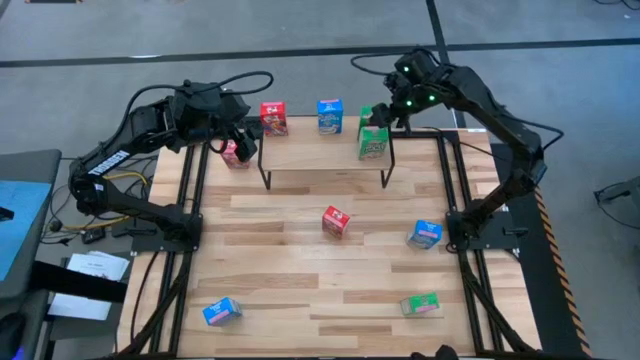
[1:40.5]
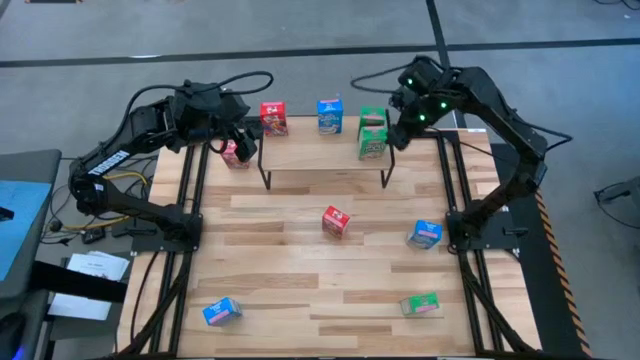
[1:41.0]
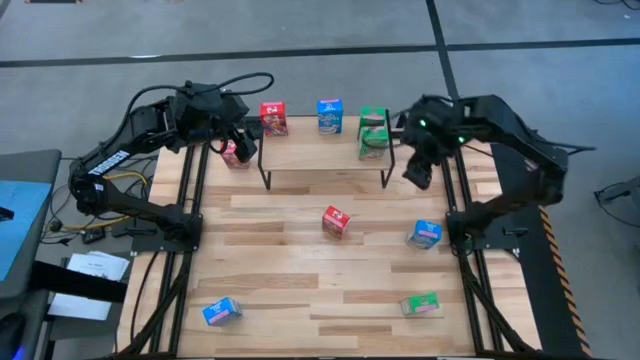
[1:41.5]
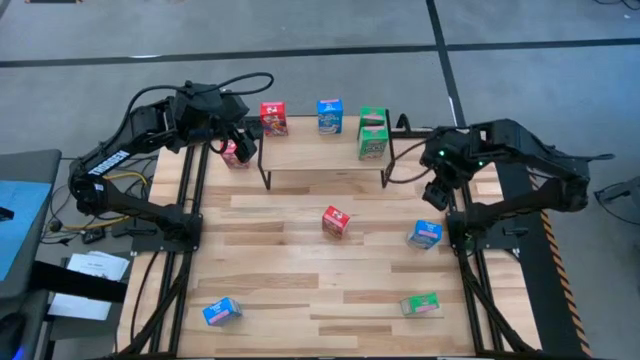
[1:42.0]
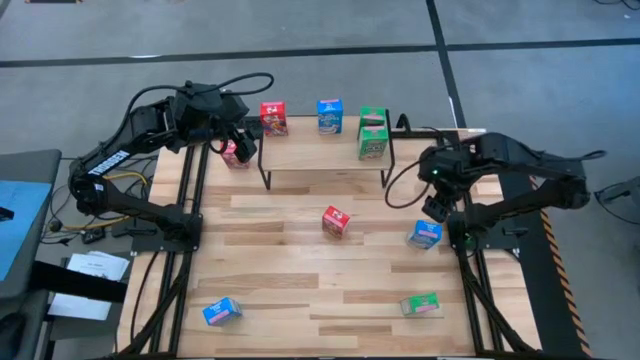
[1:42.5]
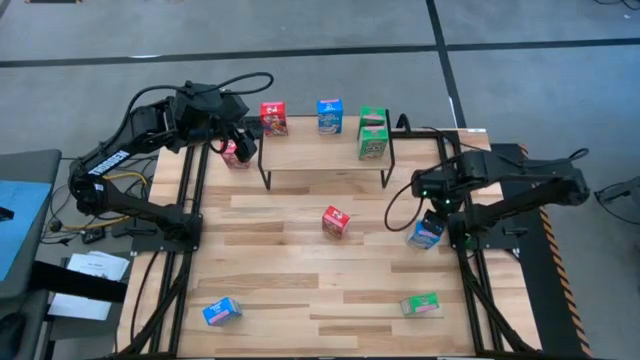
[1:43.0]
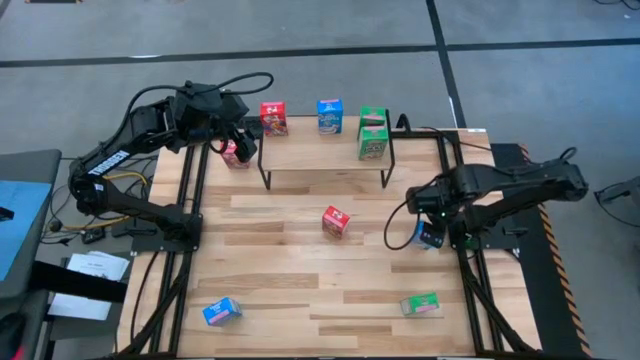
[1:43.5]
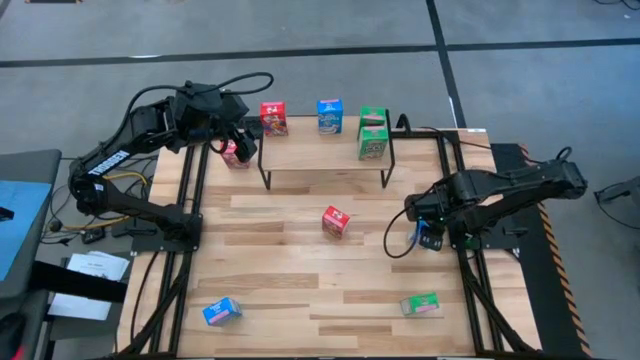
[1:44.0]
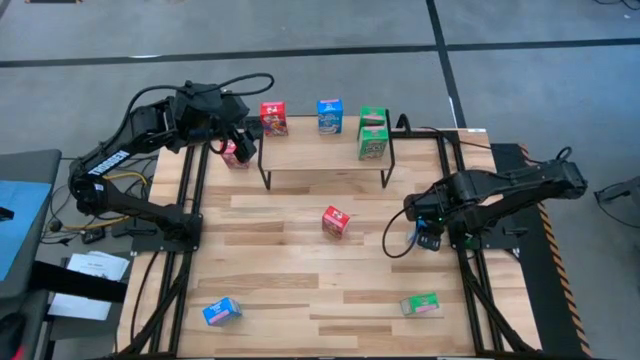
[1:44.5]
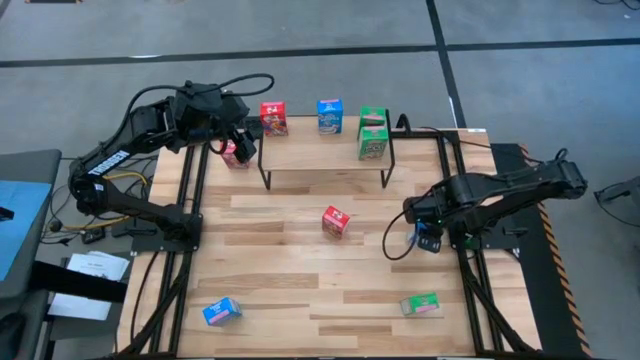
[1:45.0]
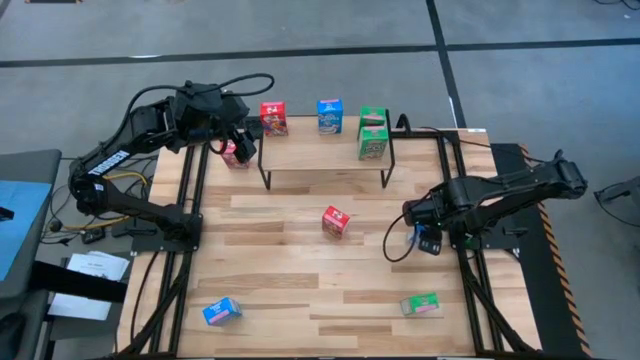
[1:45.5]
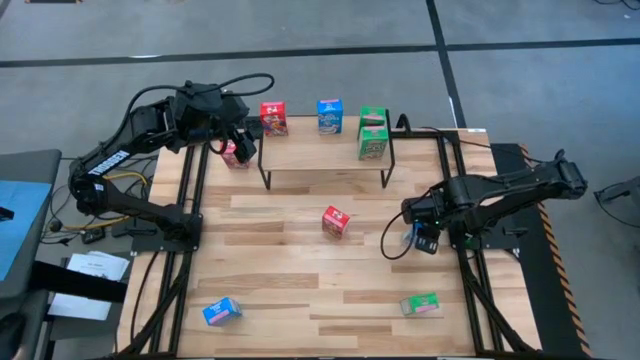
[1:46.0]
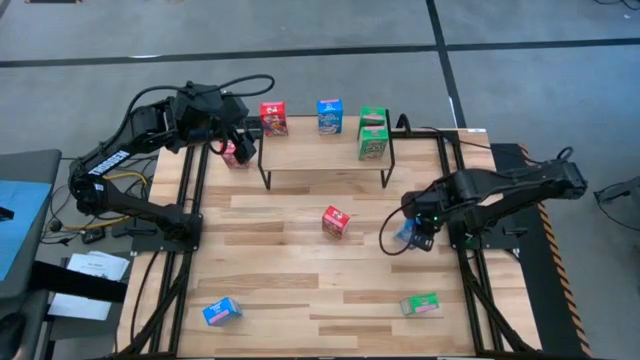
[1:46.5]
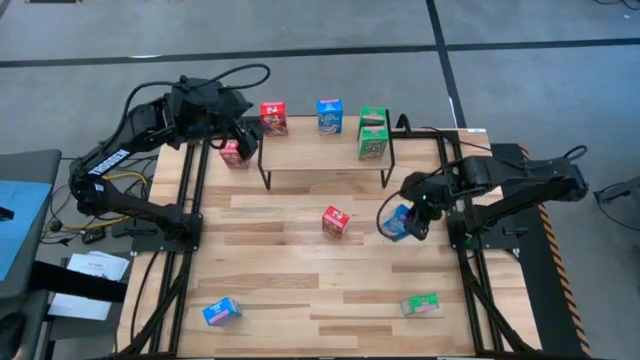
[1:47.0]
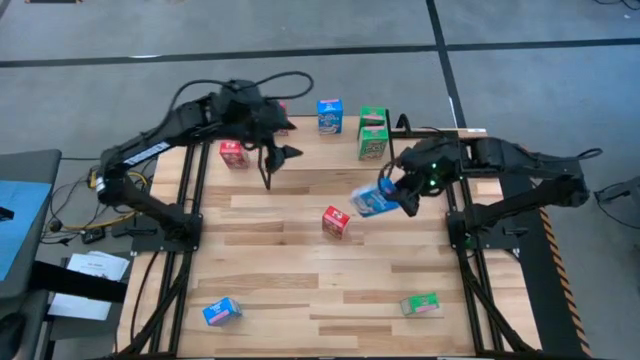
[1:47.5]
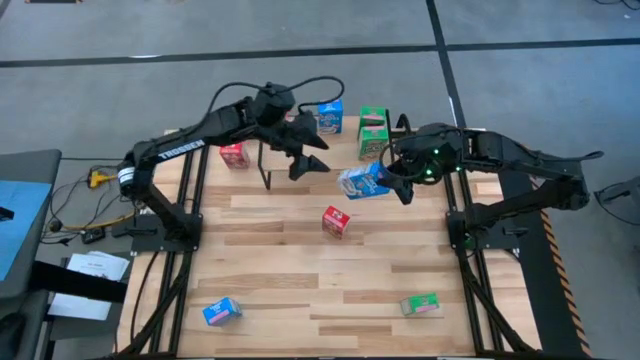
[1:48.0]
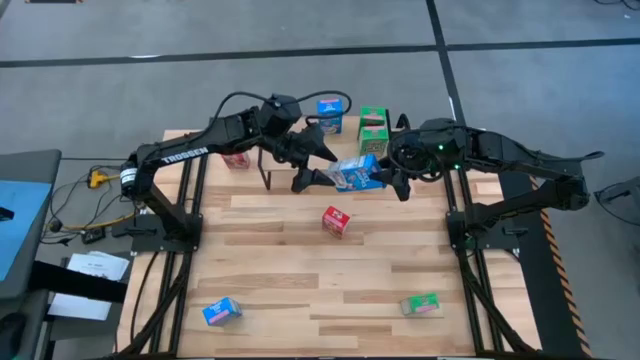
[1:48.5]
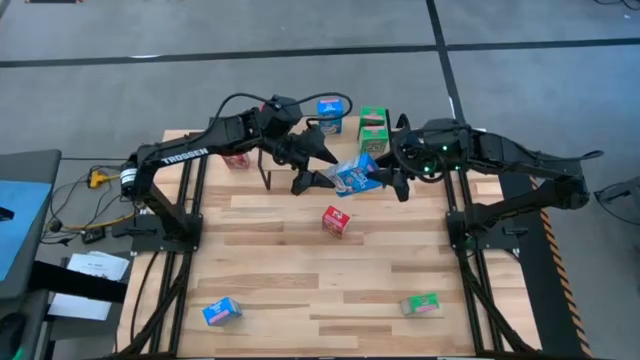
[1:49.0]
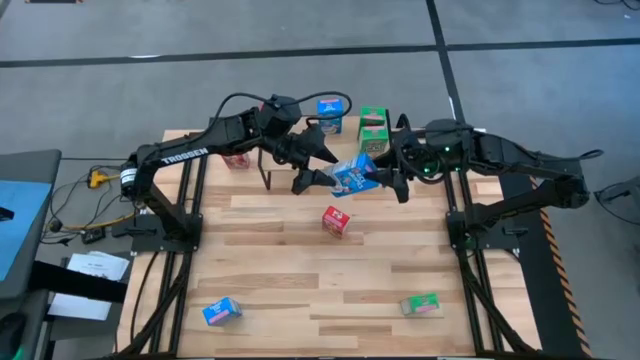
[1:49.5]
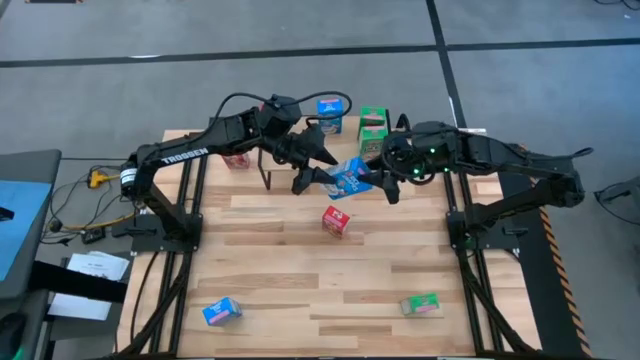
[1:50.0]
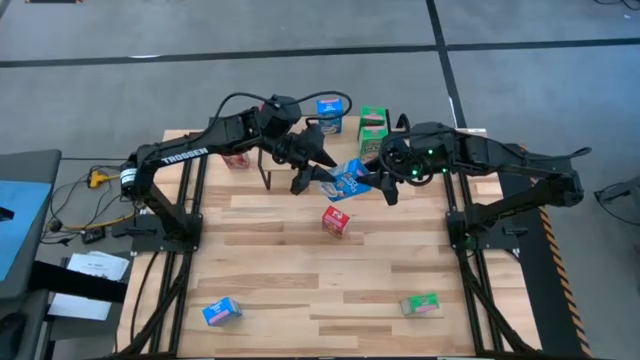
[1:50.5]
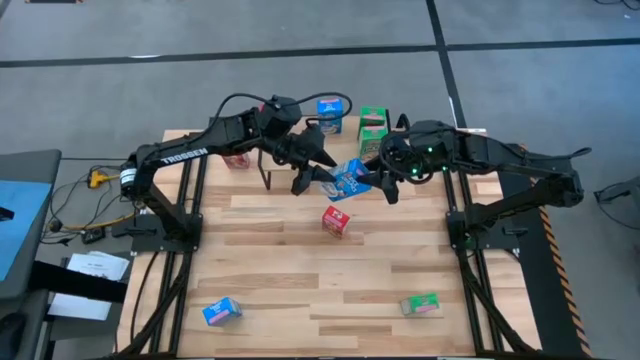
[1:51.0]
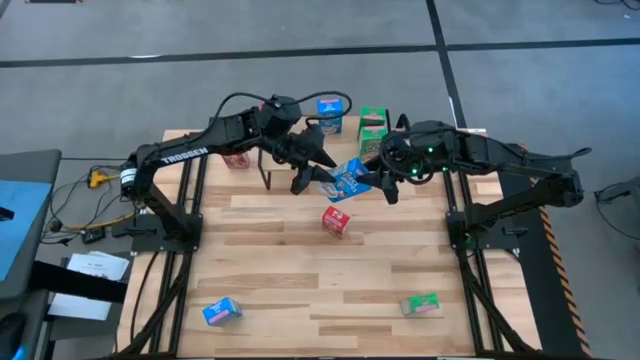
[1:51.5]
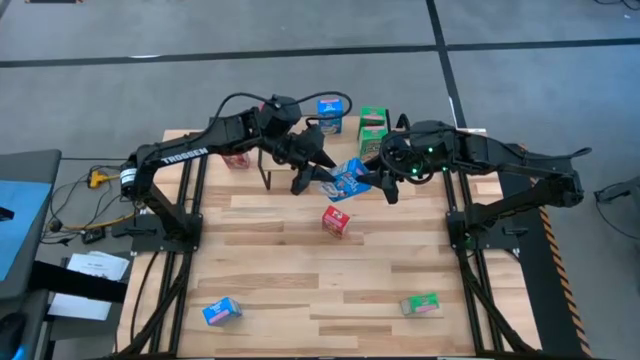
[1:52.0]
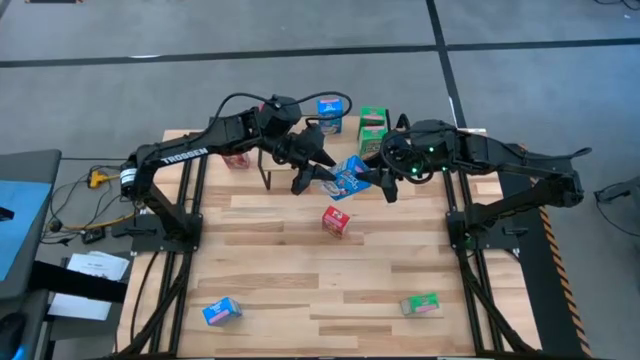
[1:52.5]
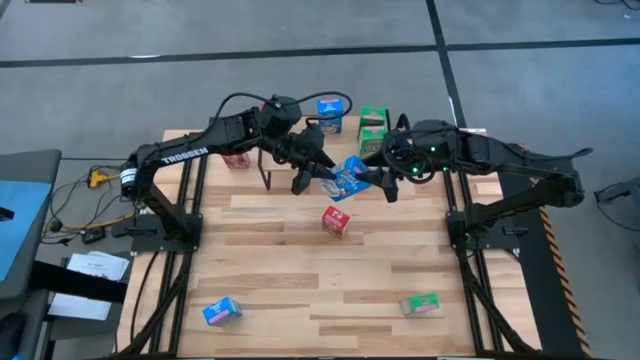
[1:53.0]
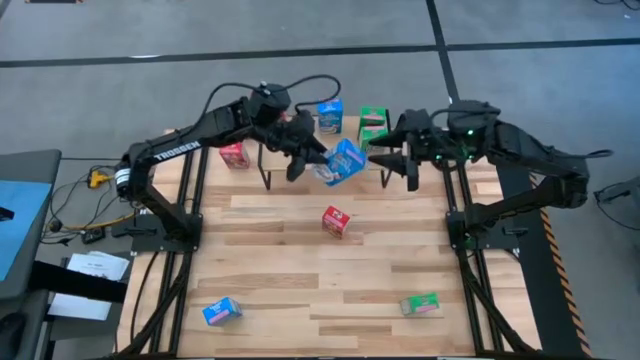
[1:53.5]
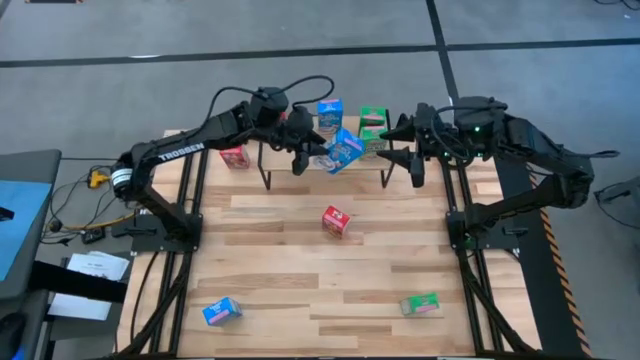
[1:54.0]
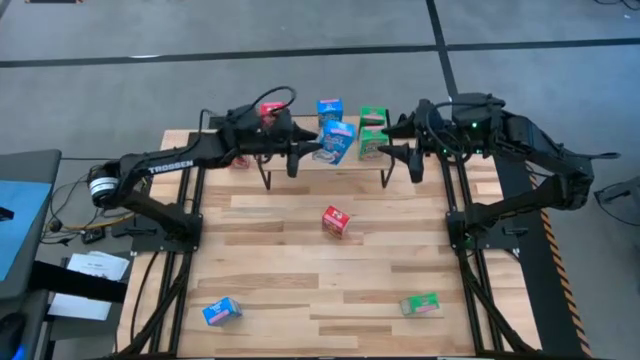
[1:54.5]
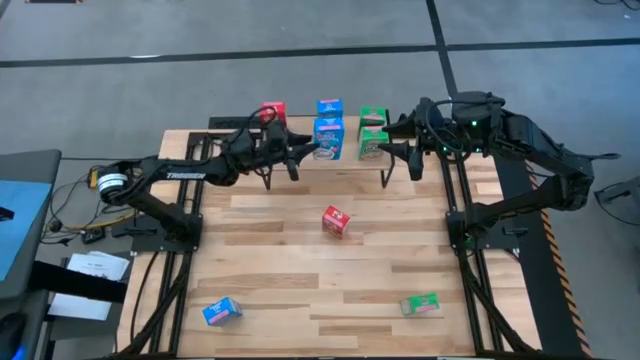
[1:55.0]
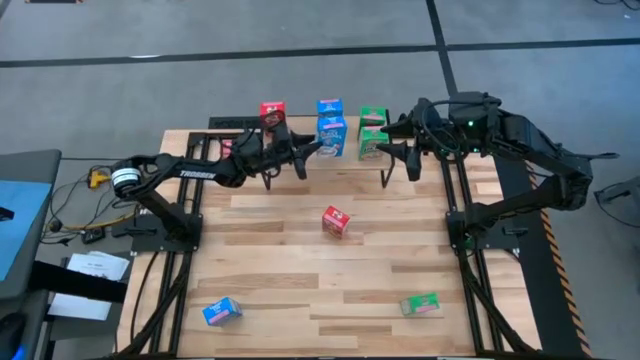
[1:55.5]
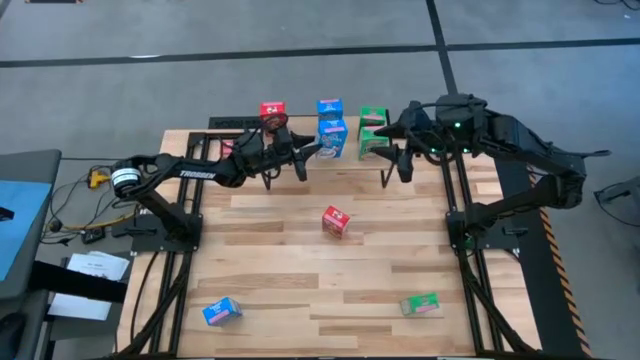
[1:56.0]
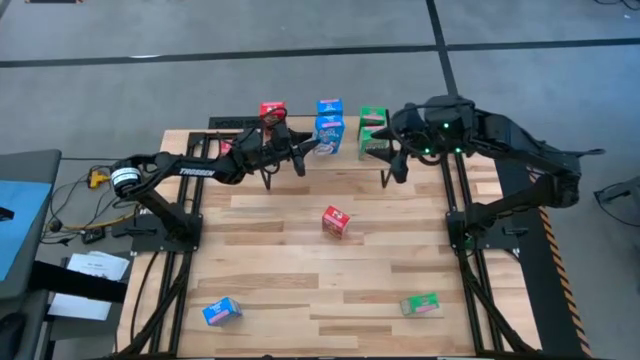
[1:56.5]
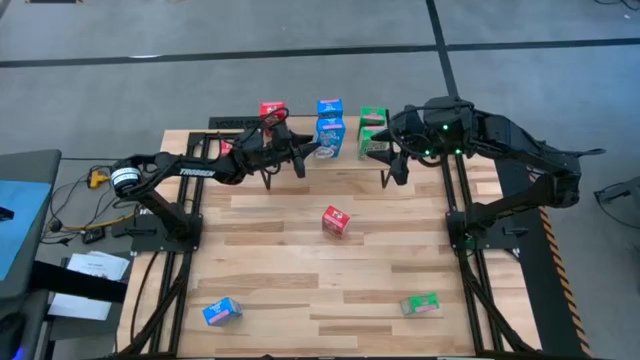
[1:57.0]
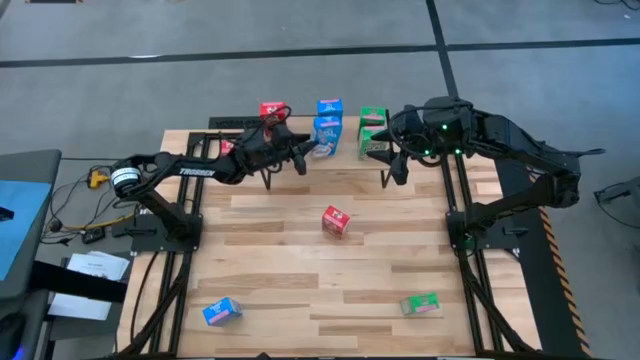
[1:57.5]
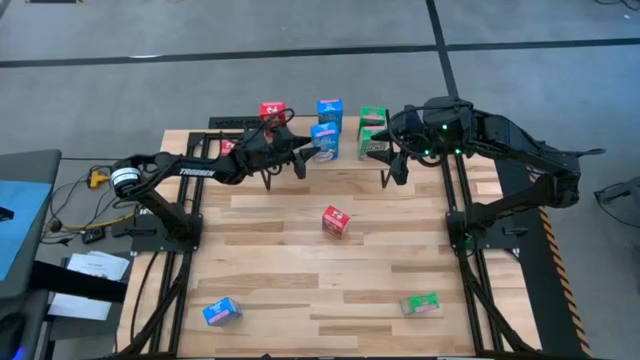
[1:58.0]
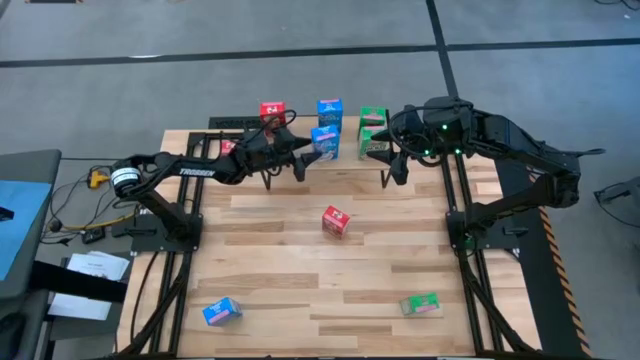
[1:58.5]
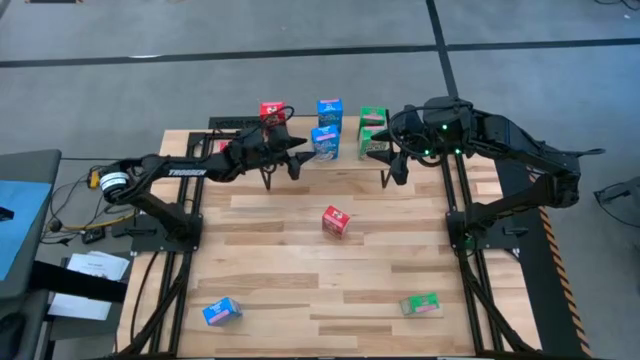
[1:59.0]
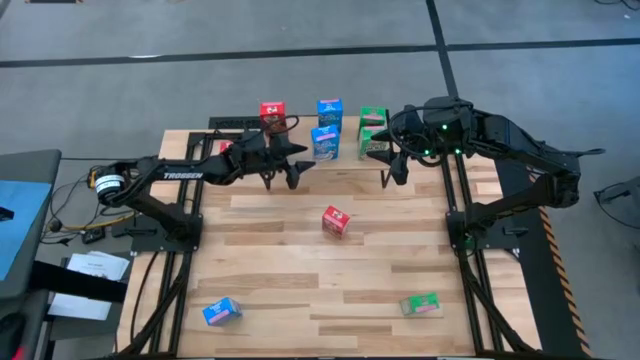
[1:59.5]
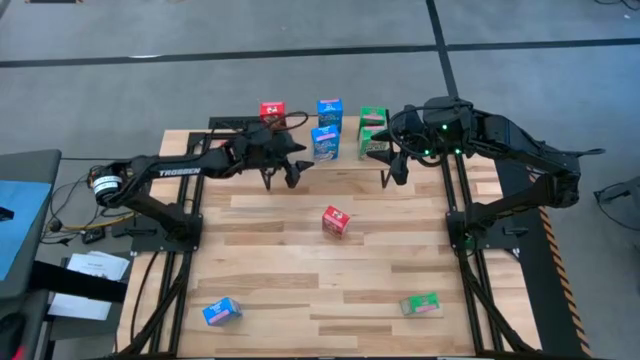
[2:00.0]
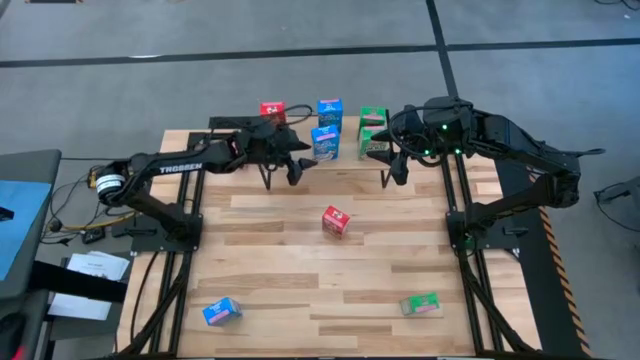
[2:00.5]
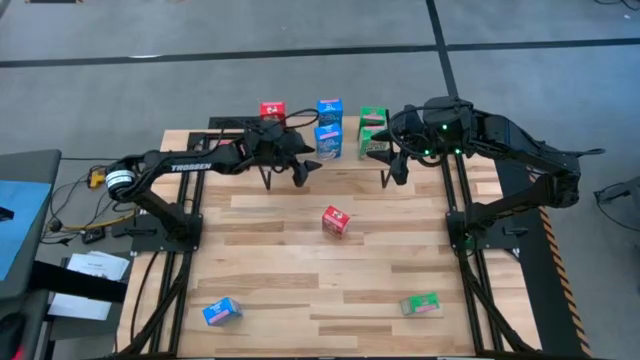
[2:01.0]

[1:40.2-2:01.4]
Task: Stack cereal on shelf
Put the top blue cereal box on the shelf aligned with the other blue cereal box
